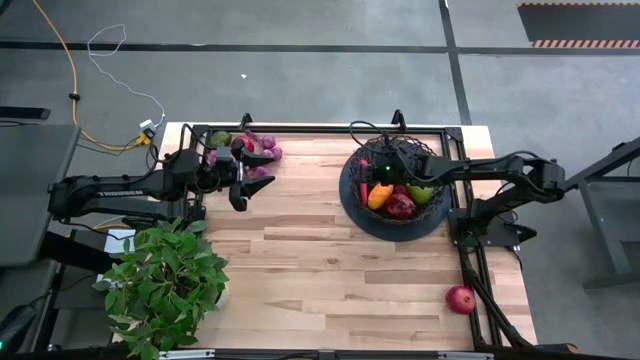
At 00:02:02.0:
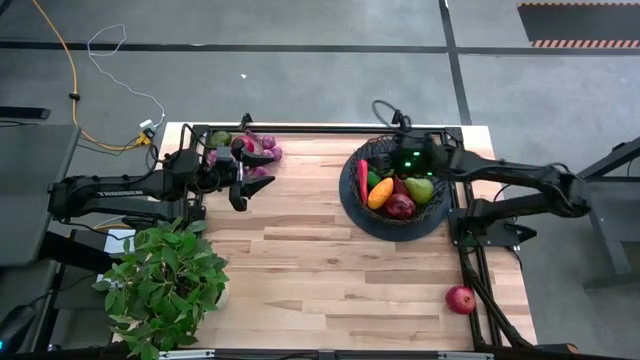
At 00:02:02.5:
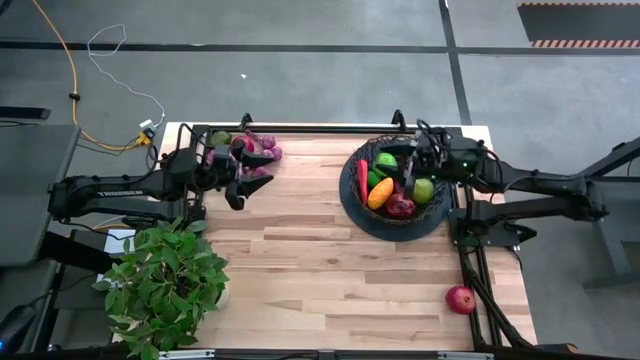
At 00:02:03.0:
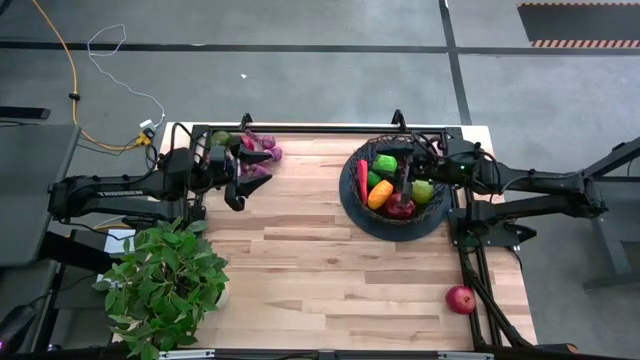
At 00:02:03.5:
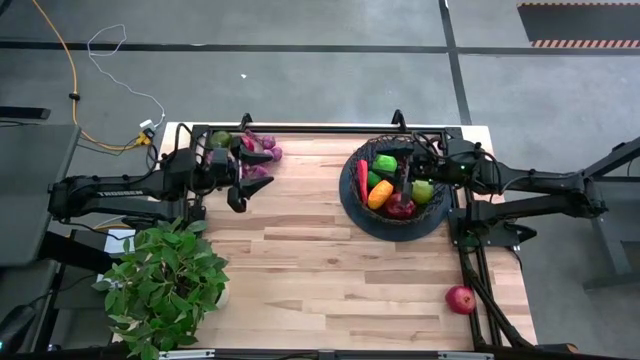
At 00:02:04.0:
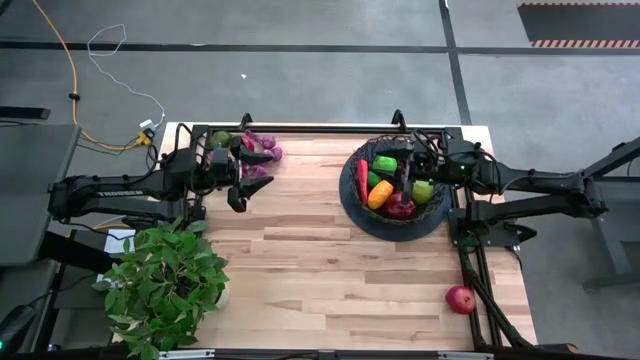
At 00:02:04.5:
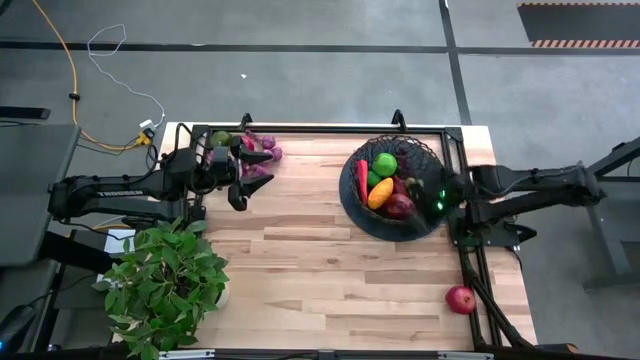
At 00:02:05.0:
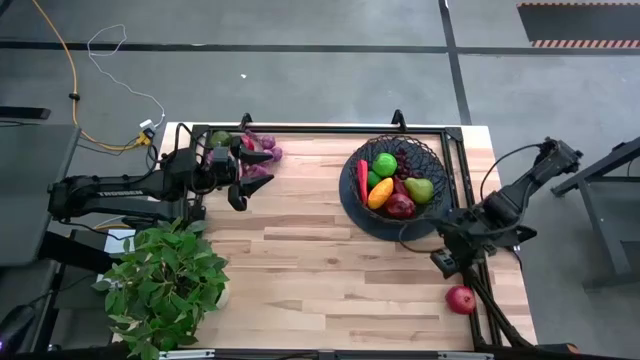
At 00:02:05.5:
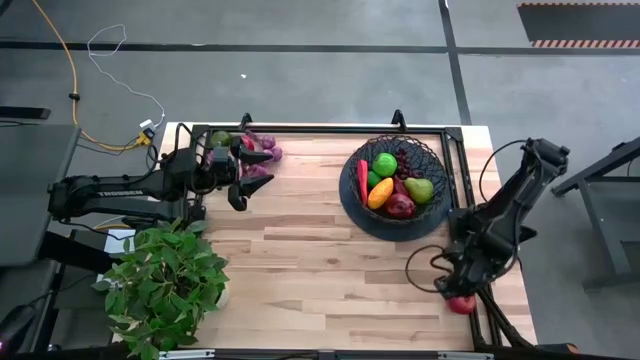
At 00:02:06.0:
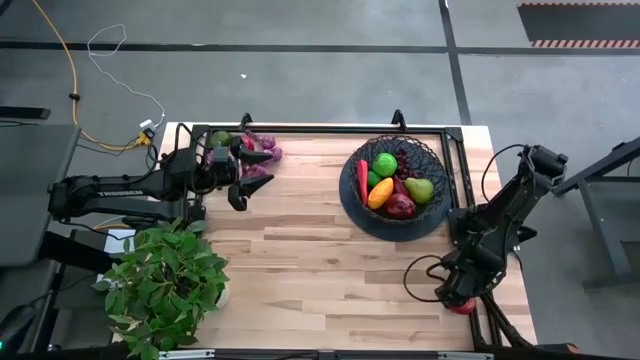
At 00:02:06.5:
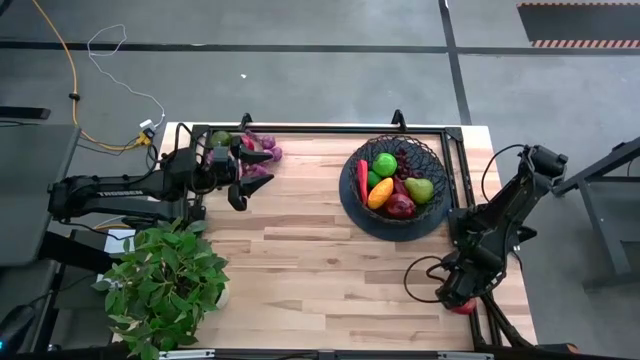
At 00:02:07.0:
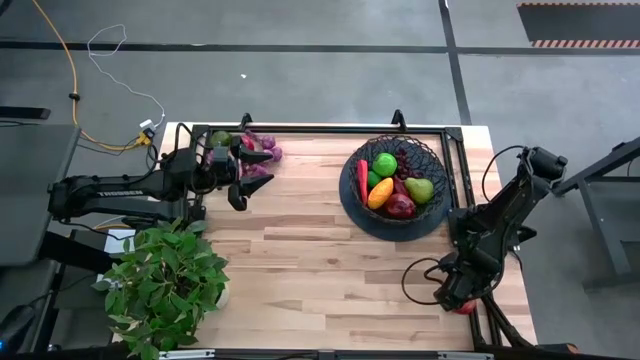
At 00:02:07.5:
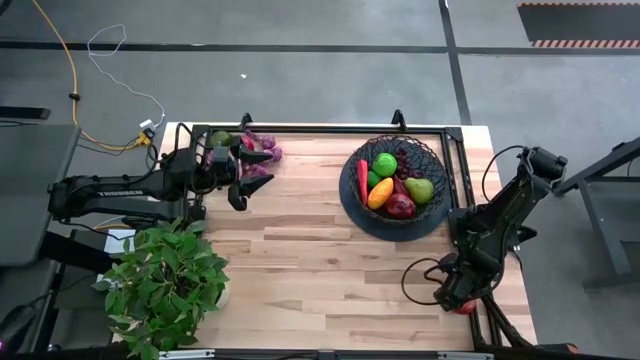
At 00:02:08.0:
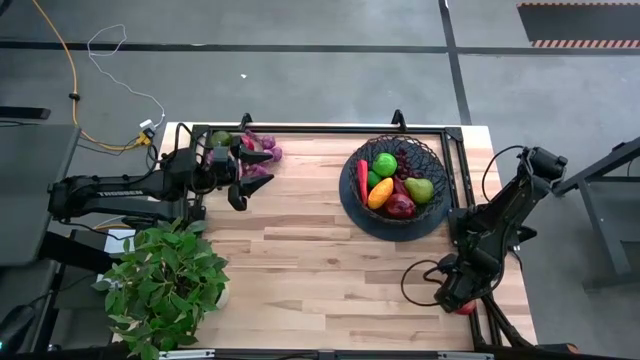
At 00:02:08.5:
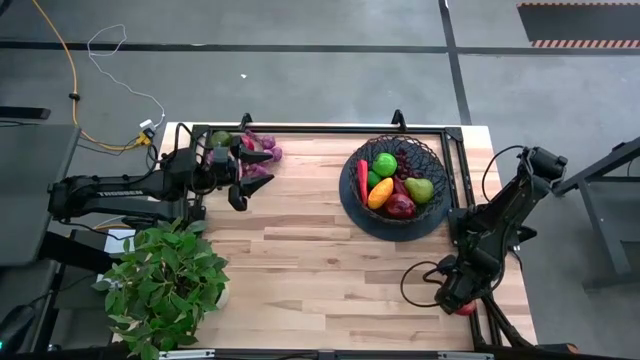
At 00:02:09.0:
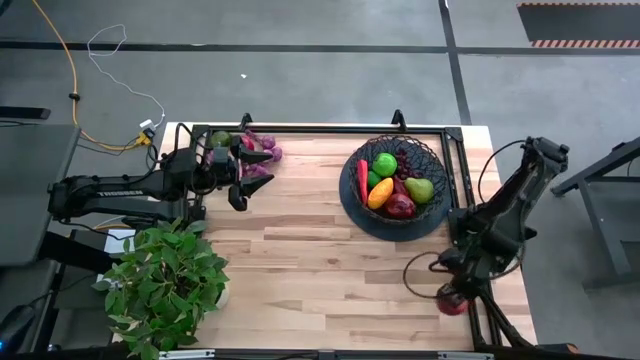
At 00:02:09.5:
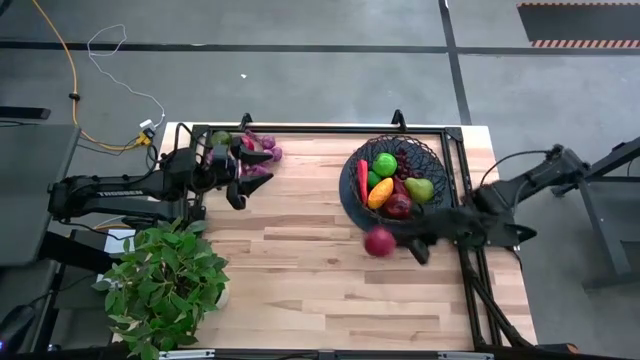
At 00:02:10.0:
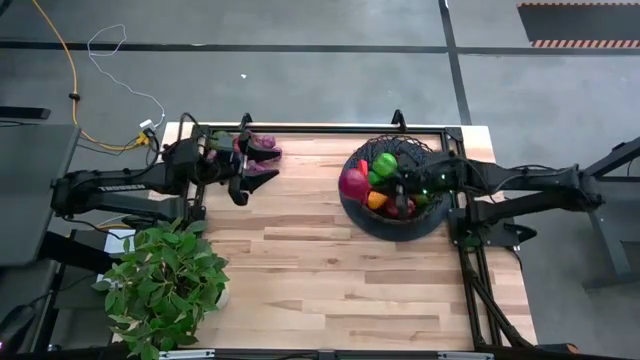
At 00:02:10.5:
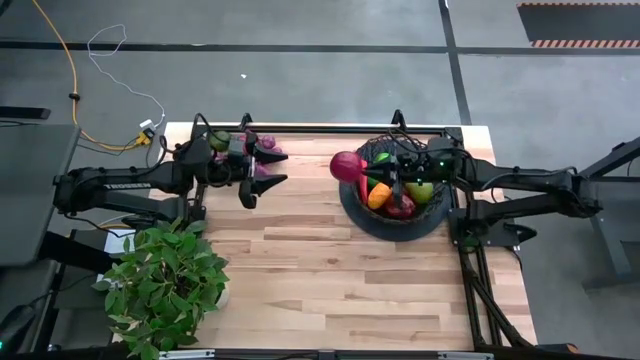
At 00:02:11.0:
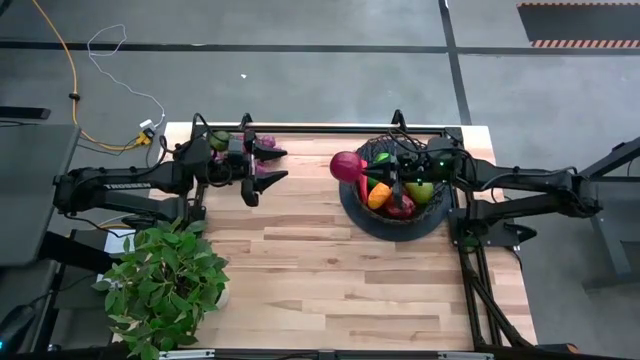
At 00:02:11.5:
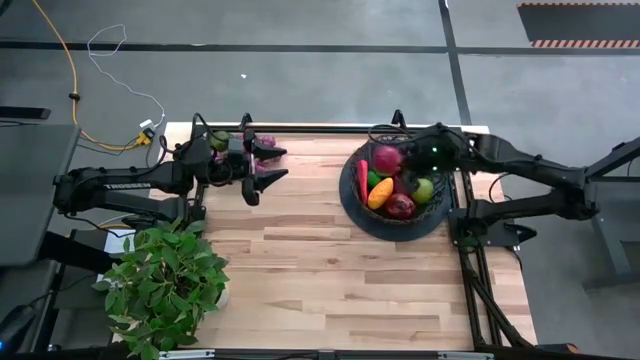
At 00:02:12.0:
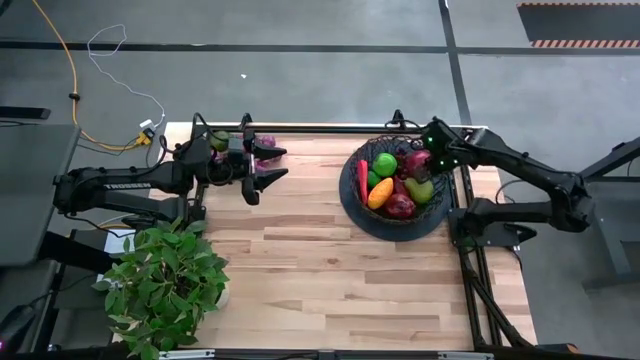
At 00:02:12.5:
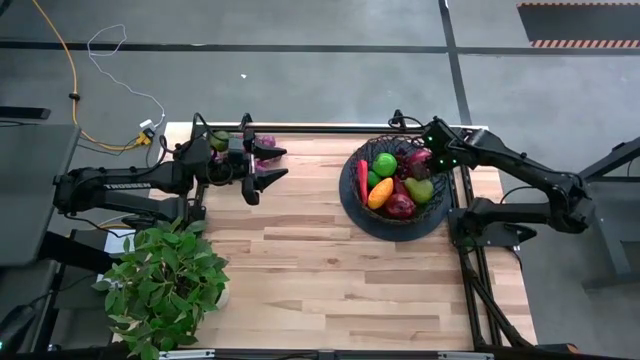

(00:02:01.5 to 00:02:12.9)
Task: Build produce basket
Put the bottom pomegranate into the black wire basket

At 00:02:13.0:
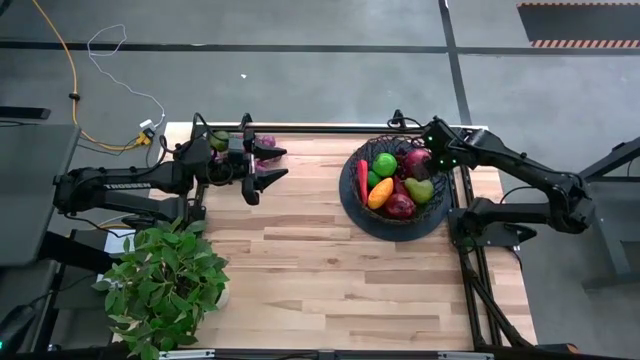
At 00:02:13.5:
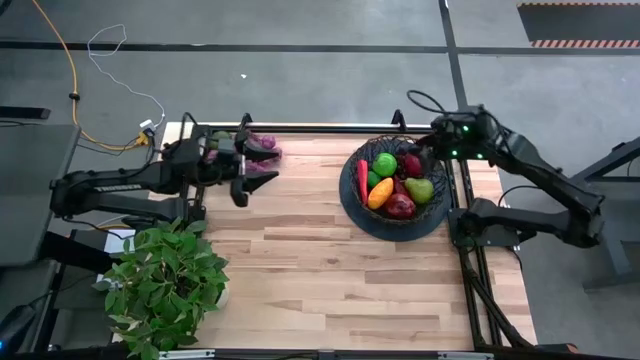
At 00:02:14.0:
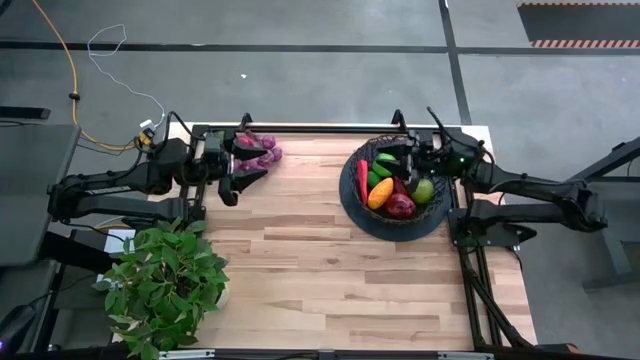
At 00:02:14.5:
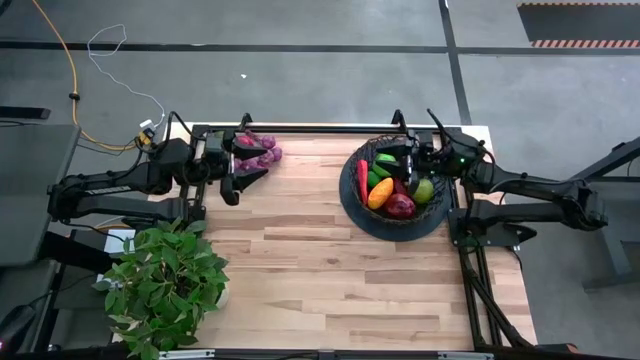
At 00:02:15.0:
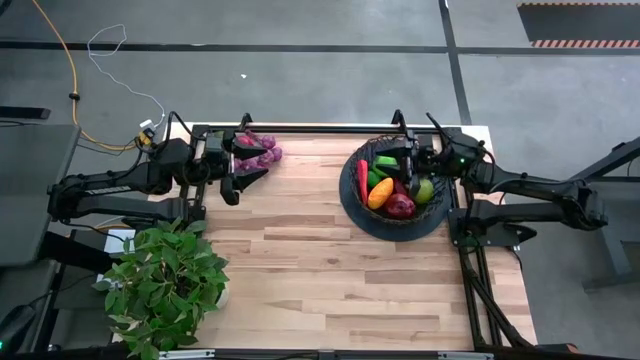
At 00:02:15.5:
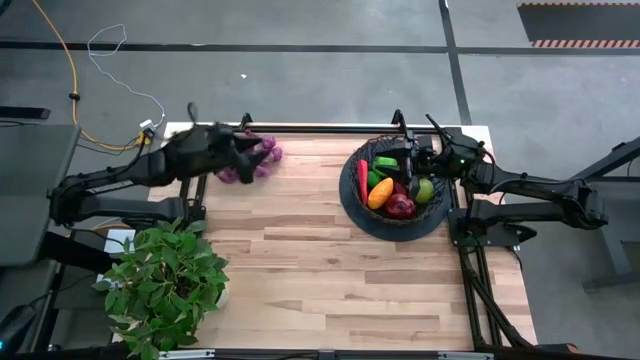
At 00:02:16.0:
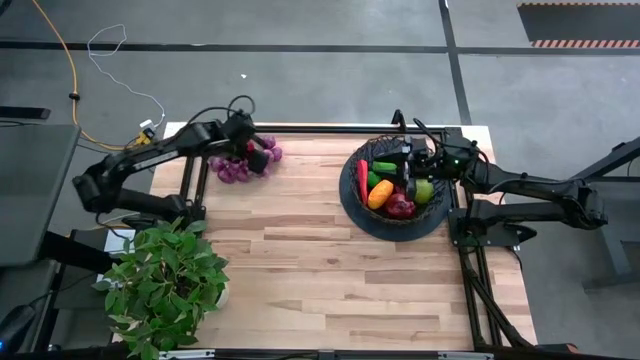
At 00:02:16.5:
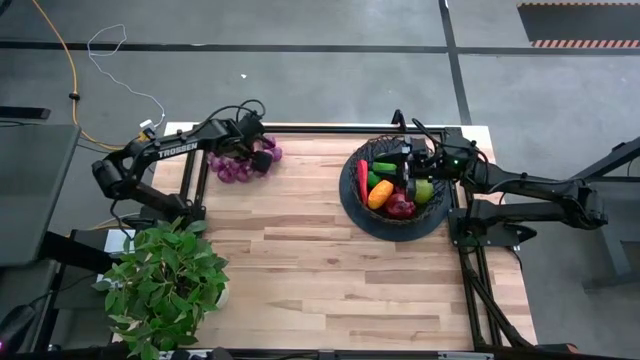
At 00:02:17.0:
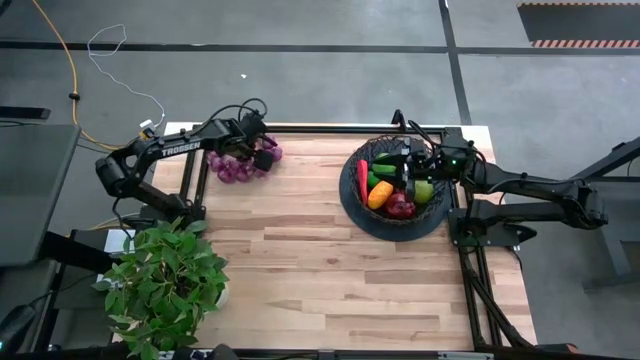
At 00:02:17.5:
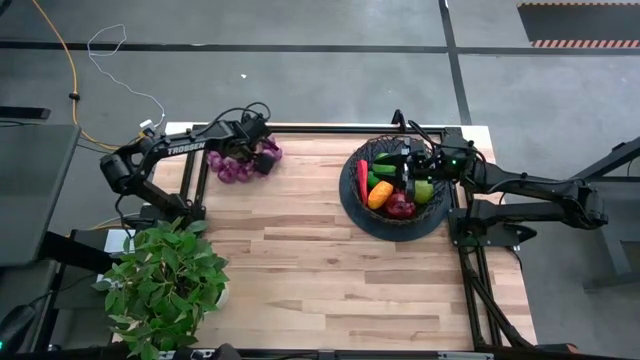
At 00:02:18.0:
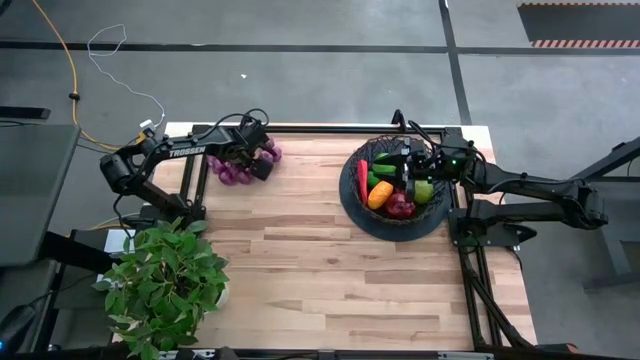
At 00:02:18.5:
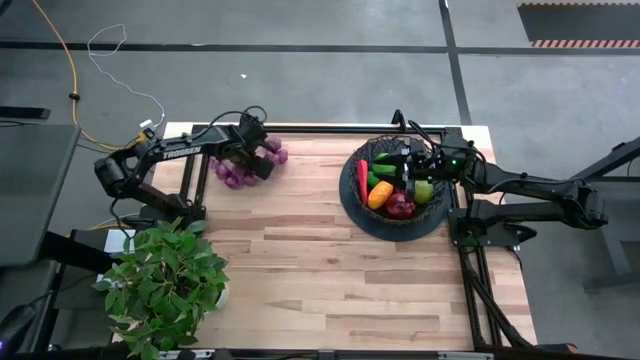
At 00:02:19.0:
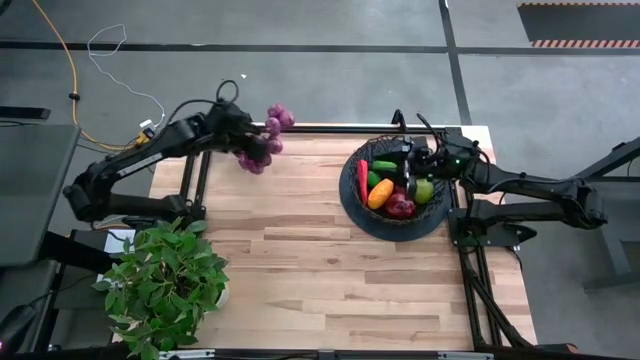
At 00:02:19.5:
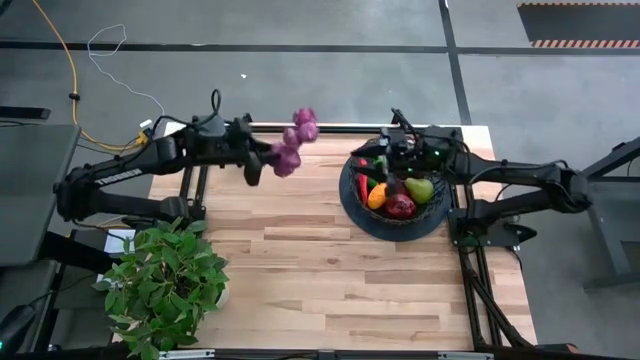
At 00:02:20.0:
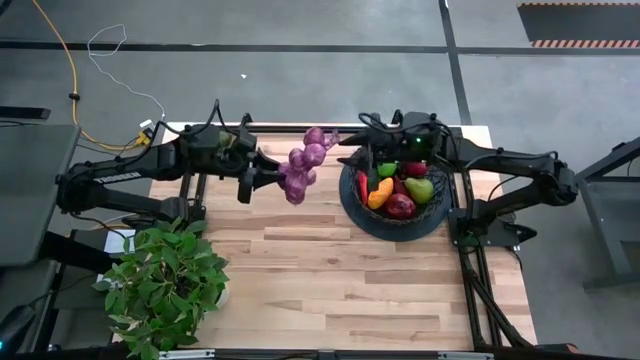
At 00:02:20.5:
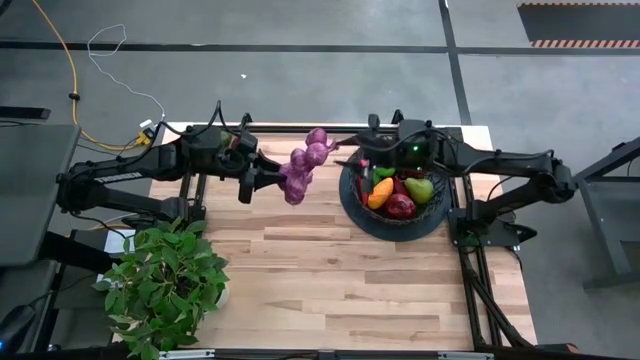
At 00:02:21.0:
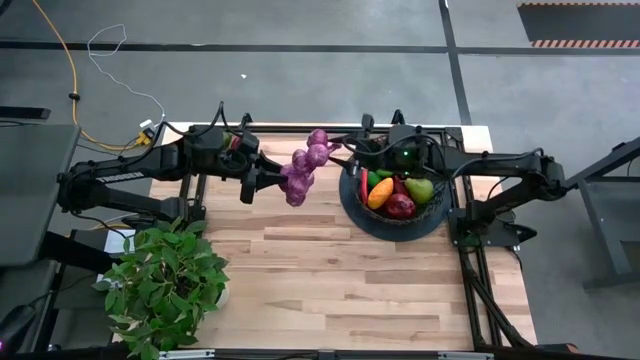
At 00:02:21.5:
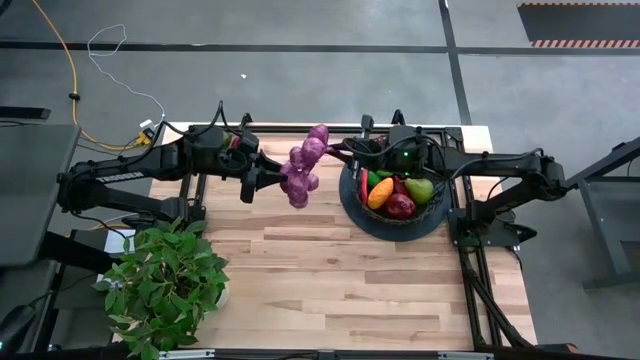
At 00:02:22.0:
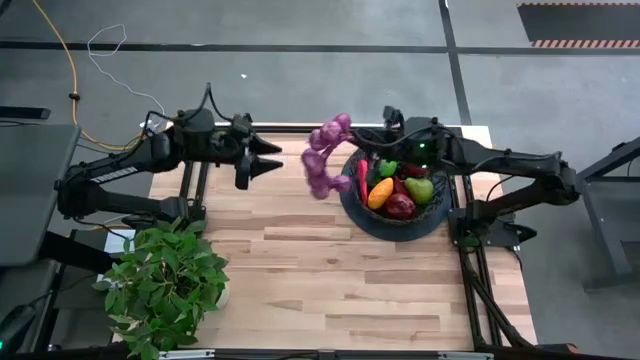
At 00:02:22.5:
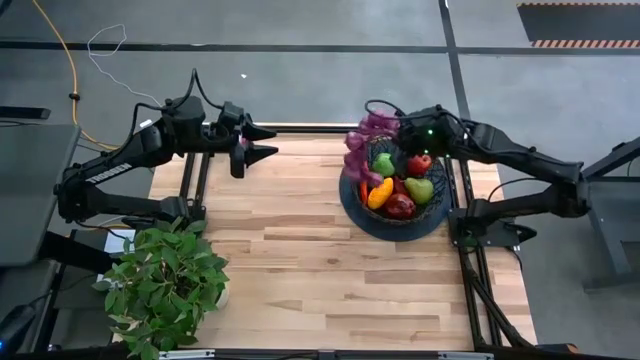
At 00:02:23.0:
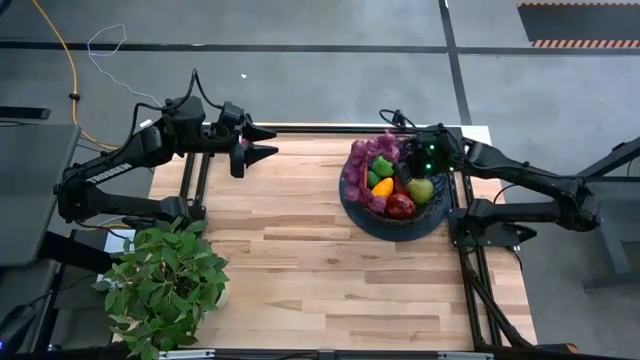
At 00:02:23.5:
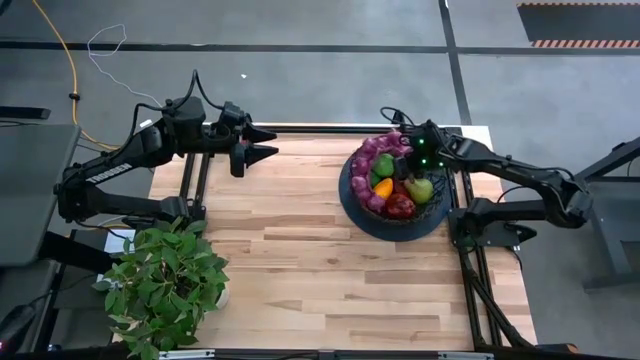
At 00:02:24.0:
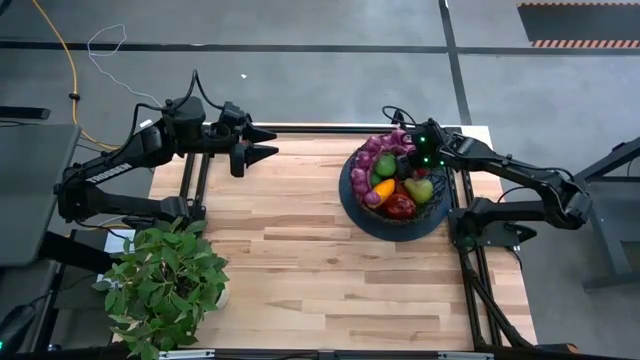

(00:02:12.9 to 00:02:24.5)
Put the purple garlic into the black wire basket
